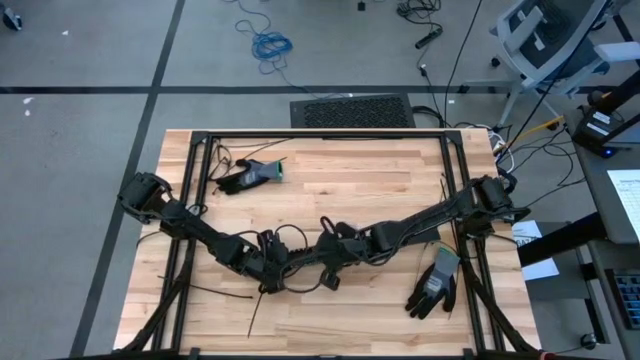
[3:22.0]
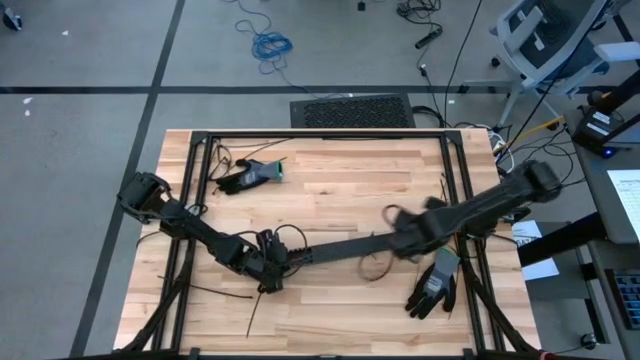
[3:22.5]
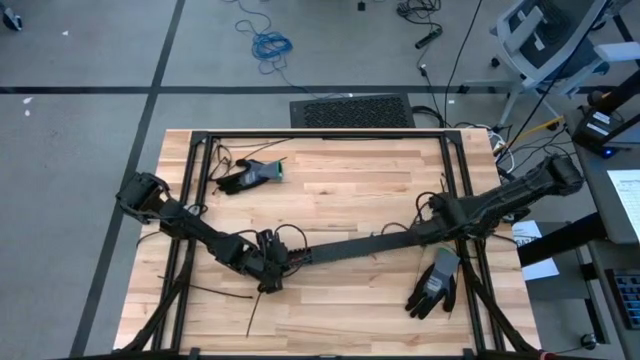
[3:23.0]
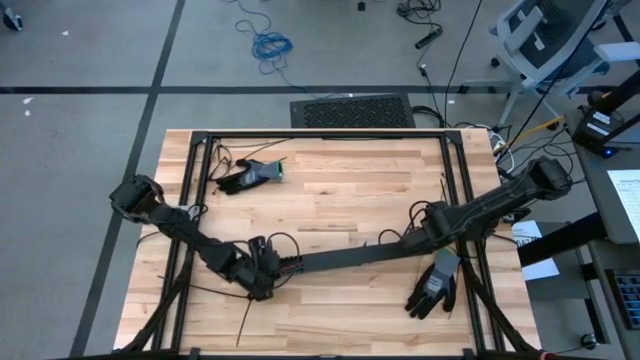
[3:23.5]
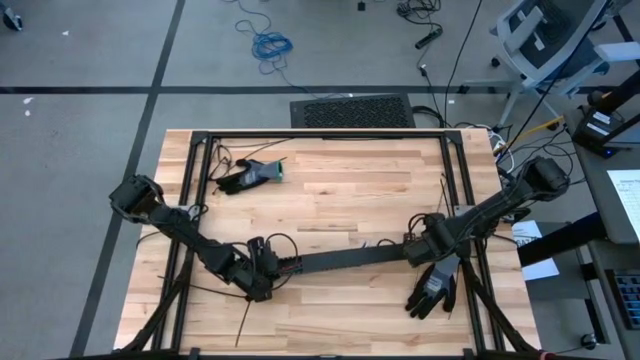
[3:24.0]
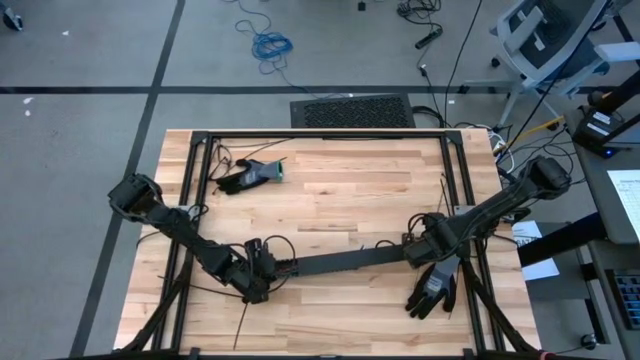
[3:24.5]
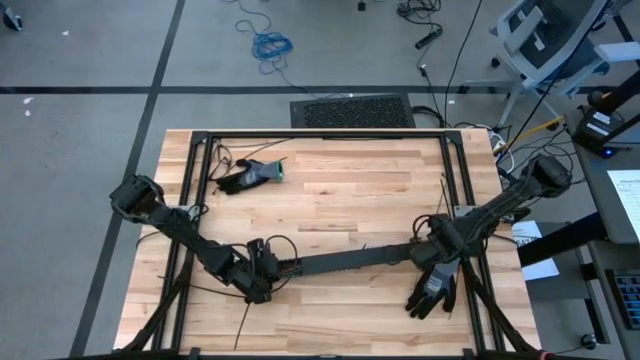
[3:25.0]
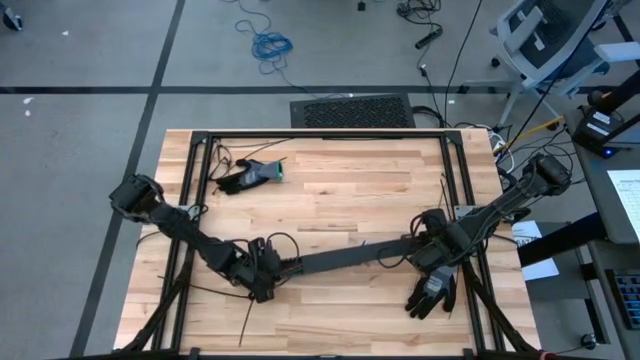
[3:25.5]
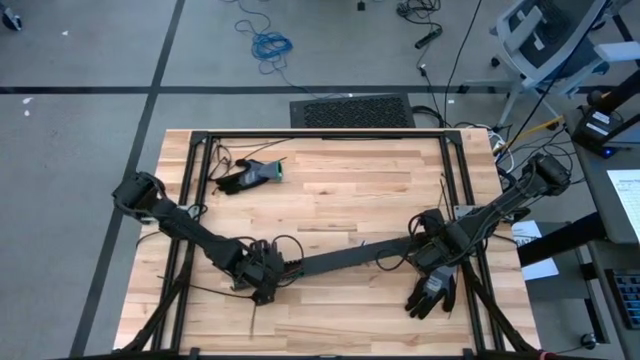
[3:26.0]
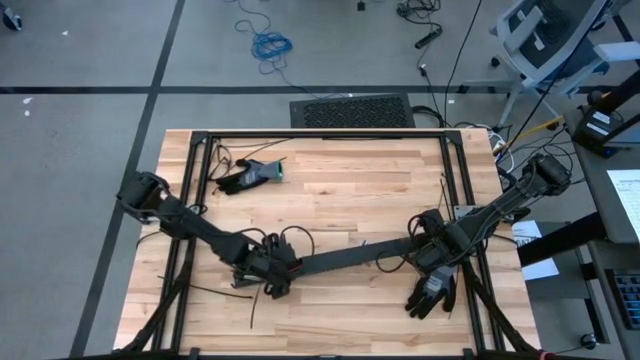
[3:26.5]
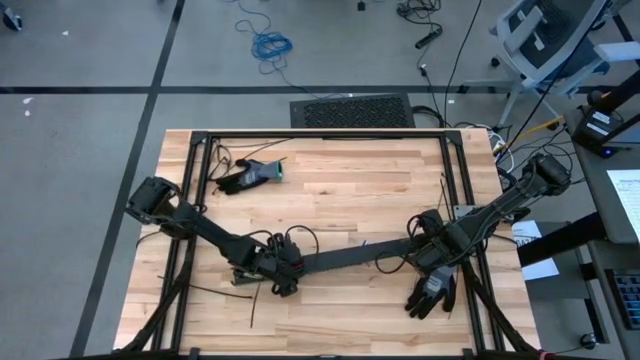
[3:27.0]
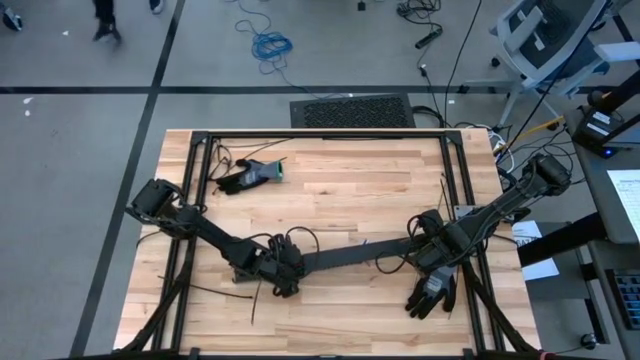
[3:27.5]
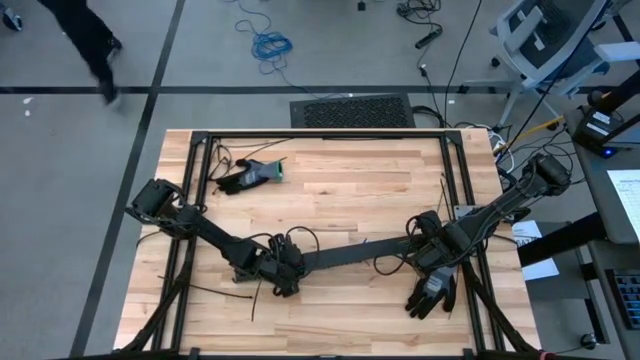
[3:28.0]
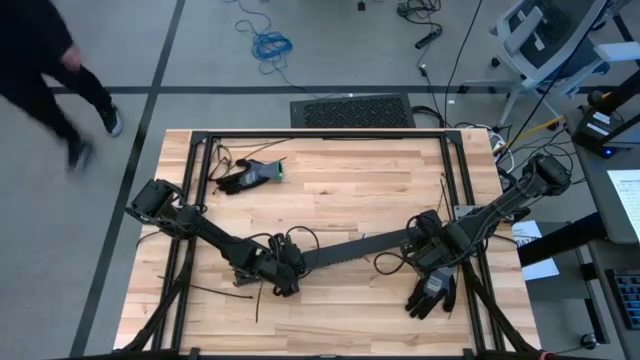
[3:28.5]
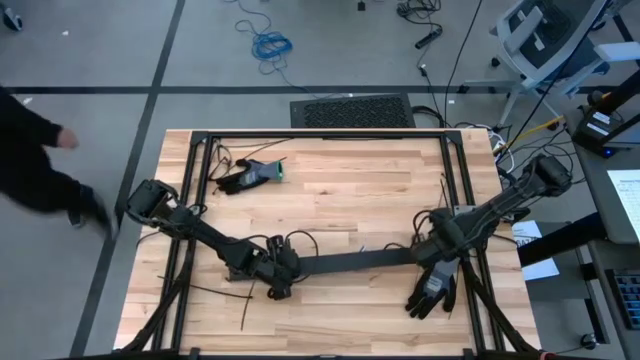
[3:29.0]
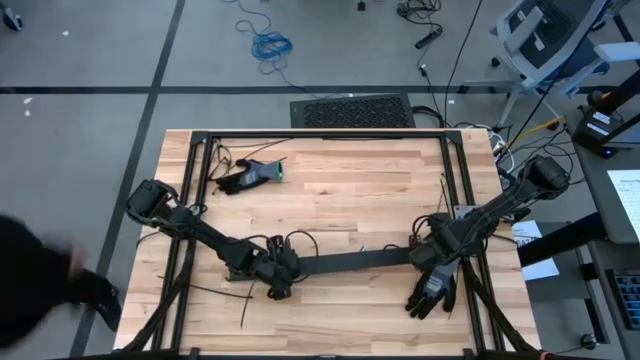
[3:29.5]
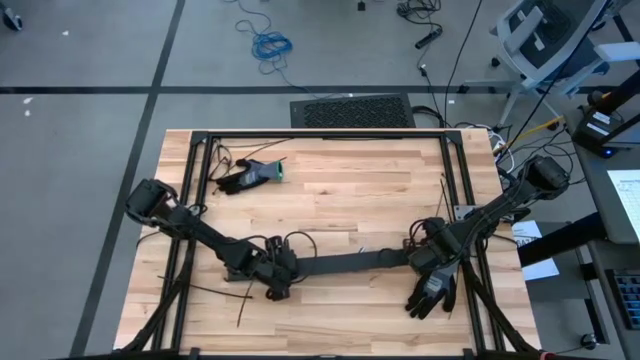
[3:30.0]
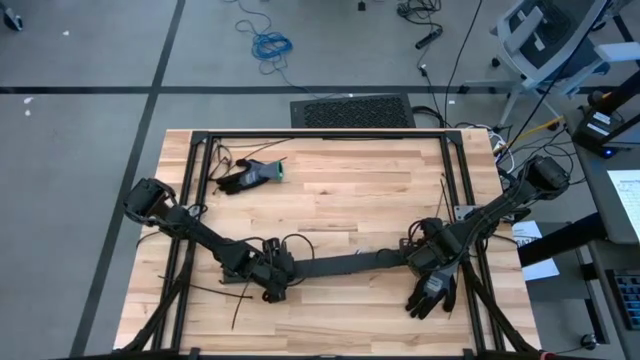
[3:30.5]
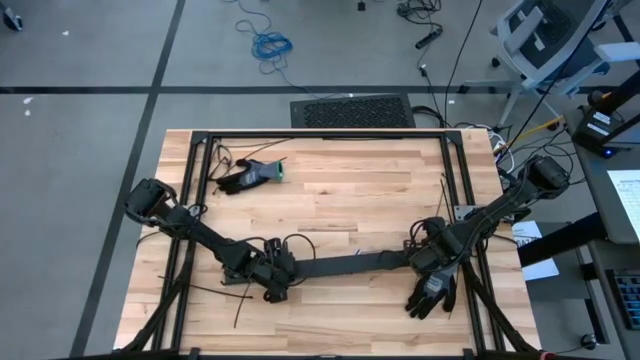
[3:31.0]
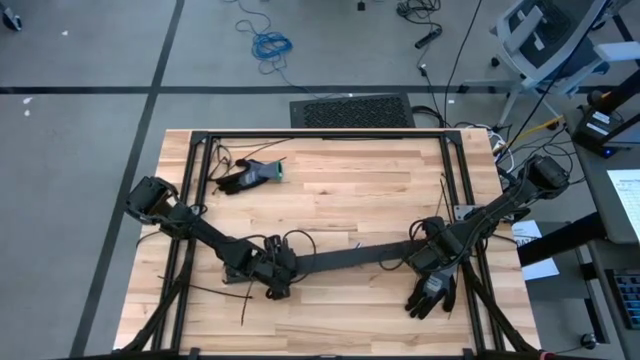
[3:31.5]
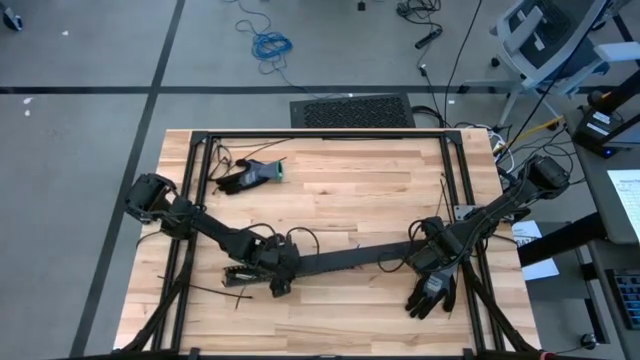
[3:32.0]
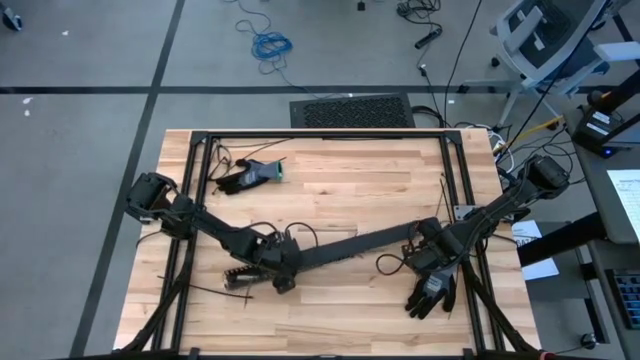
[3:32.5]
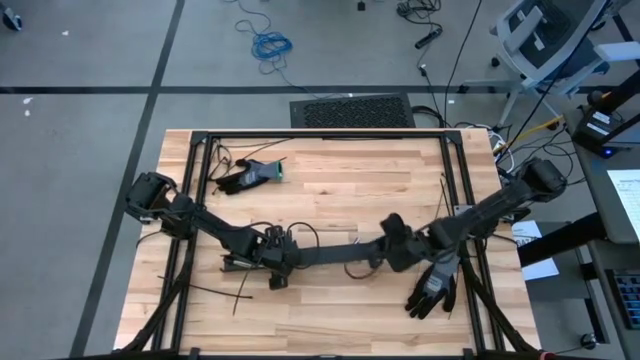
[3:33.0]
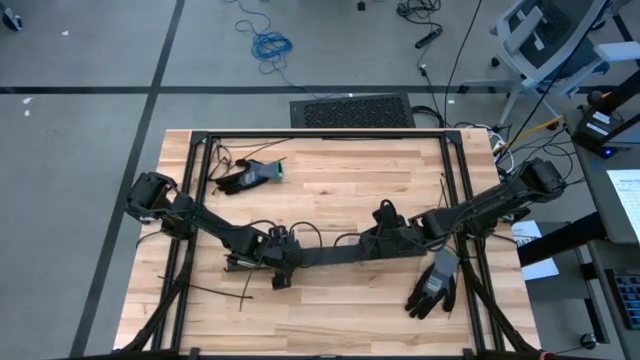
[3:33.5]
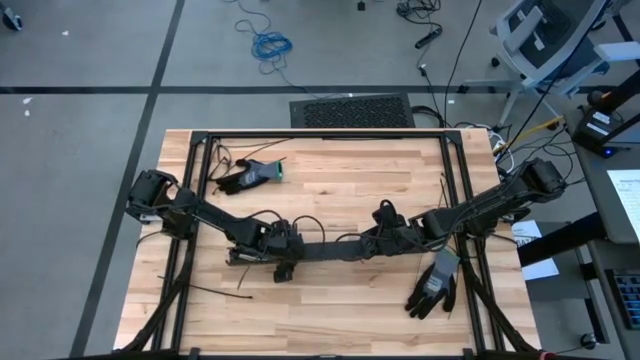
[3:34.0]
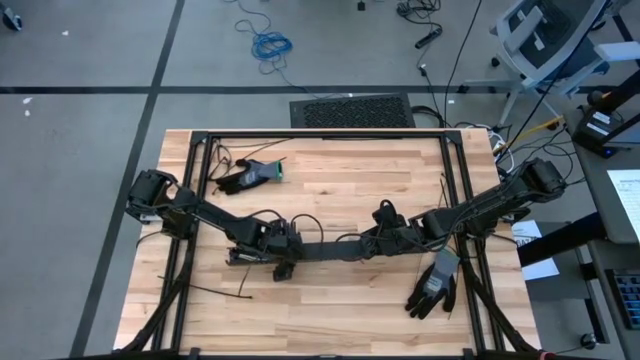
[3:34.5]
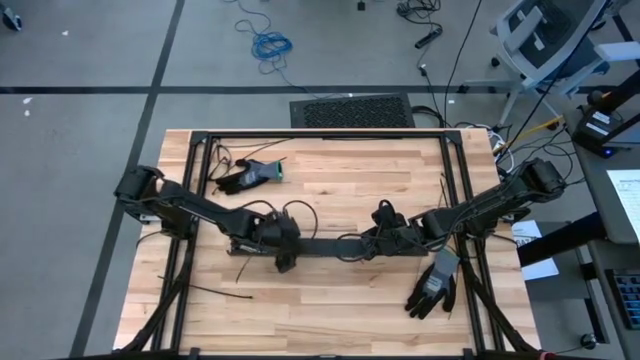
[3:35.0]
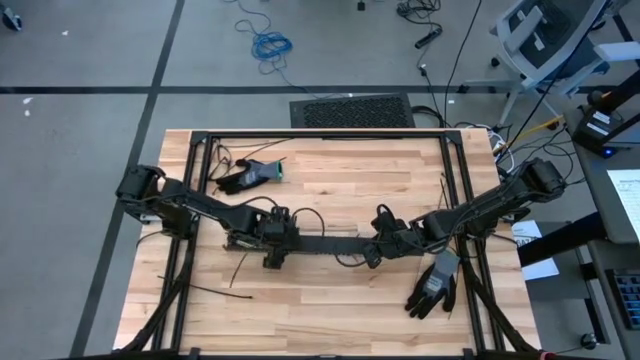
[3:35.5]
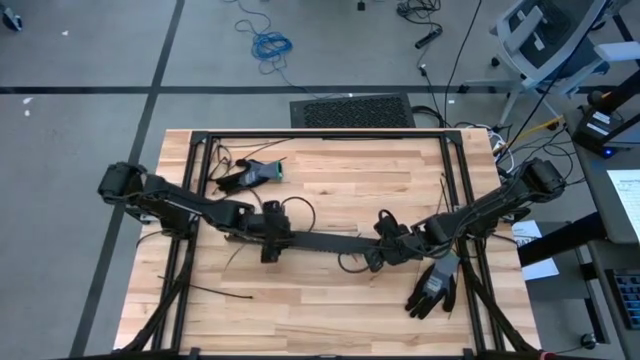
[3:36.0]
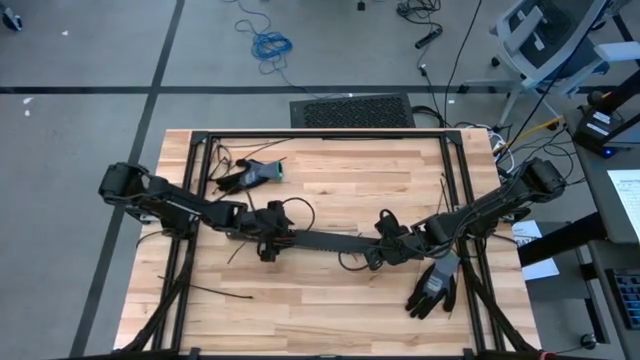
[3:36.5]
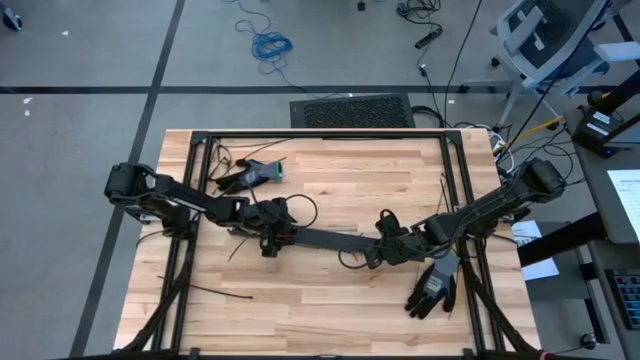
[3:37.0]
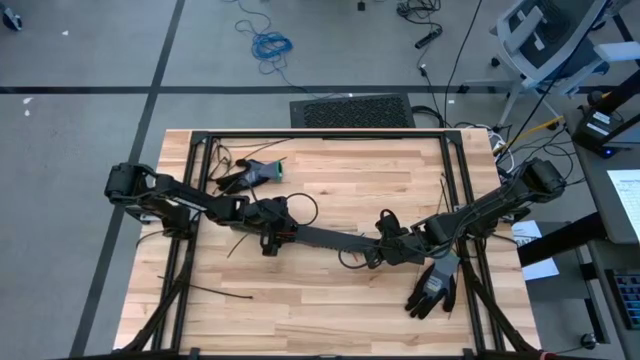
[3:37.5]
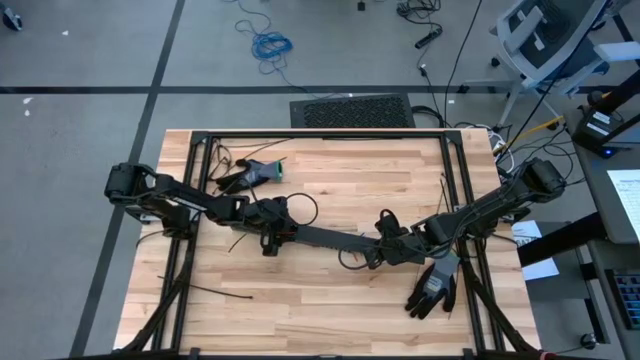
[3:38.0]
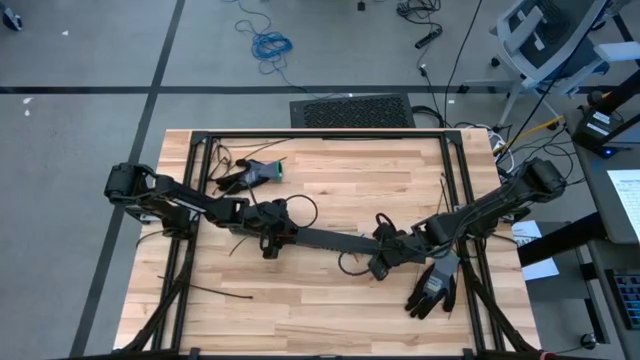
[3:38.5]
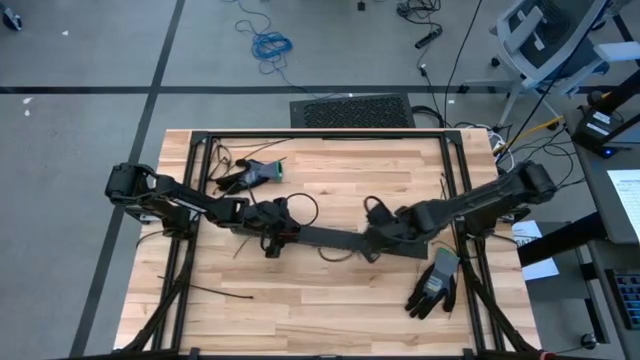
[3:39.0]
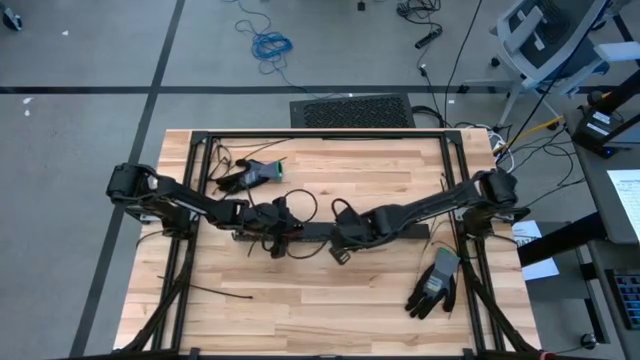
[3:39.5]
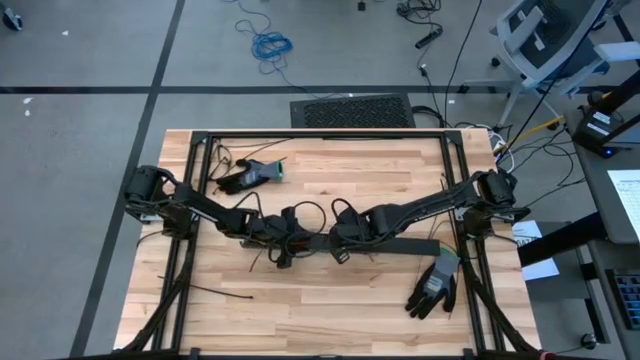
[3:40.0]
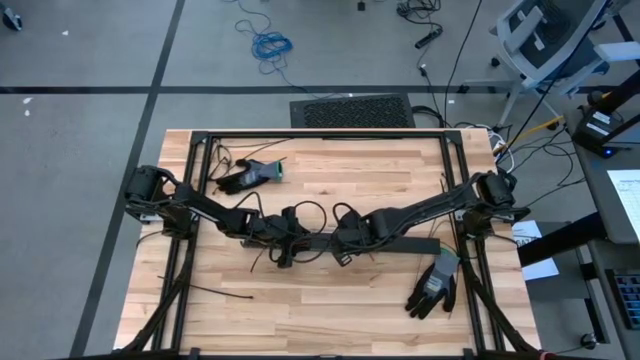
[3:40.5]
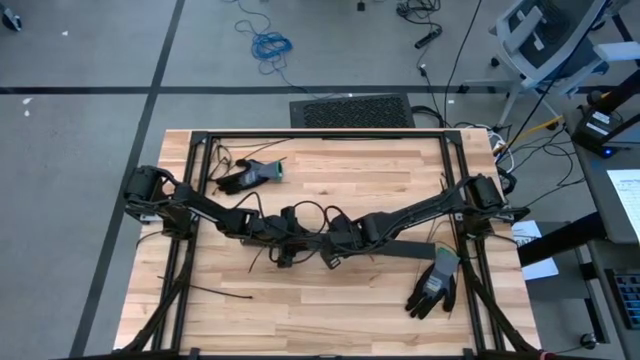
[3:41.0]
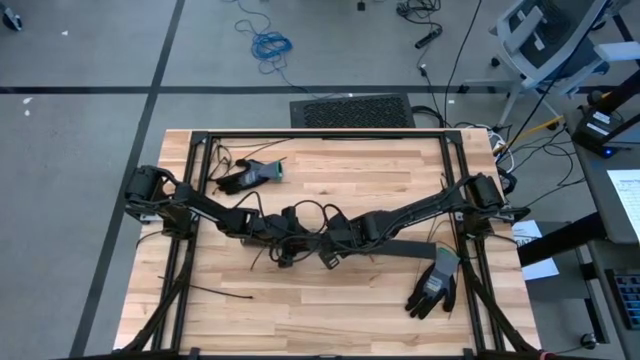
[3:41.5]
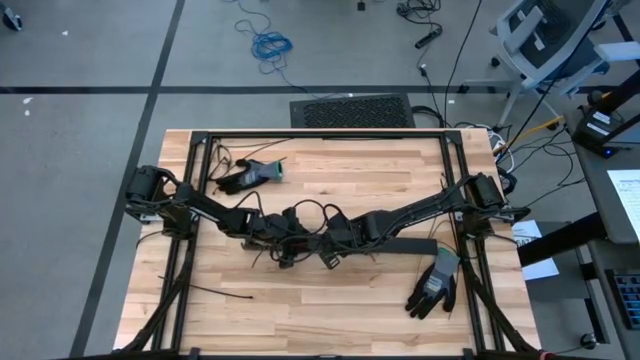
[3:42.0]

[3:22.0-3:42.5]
Task: Ziptie cables
Close the black cable duct

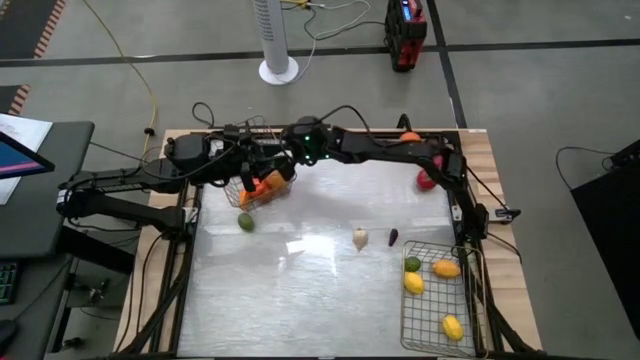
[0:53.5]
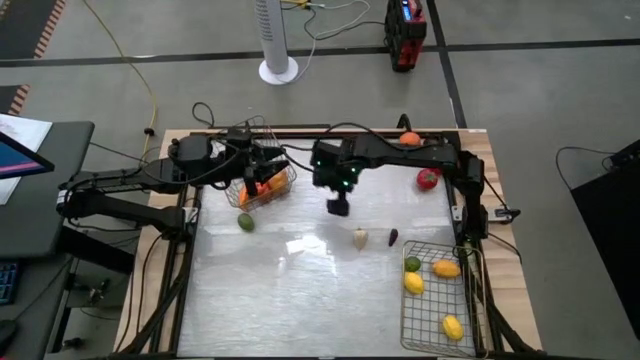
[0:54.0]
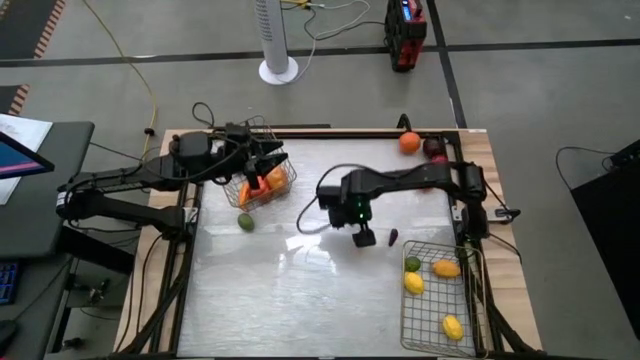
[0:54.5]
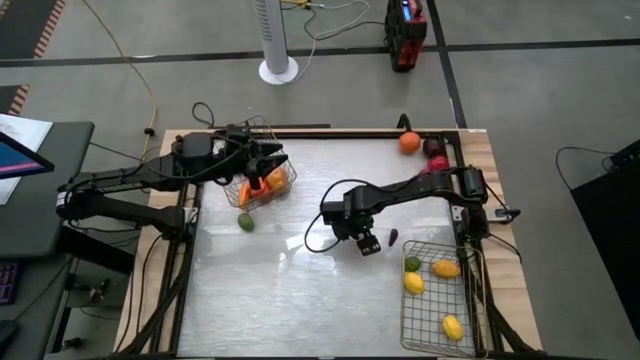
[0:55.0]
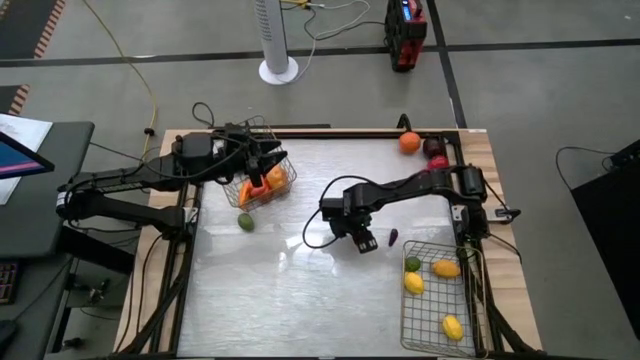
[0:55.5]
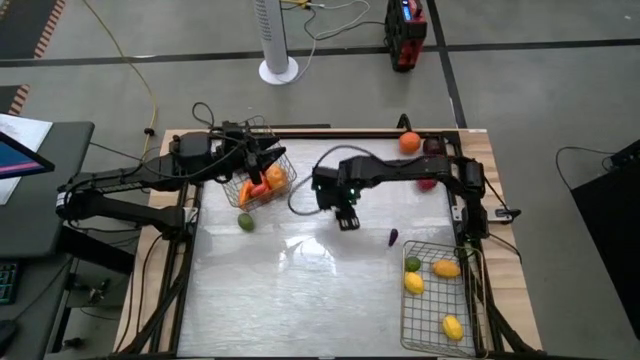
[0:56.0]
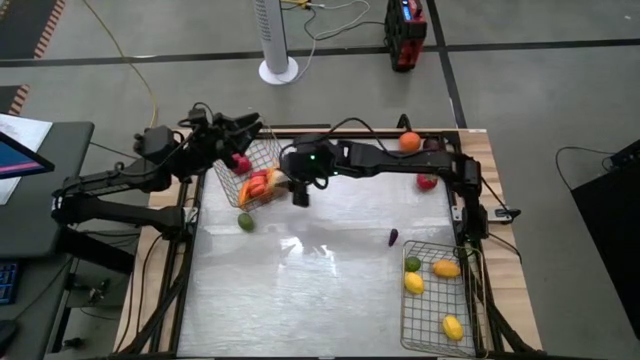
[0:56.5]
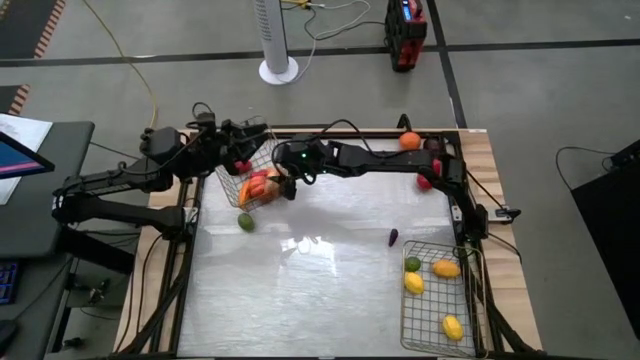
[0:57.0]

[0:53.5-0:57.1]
Task: Sort produce into baskets
Put the garlic into the top wire basket
